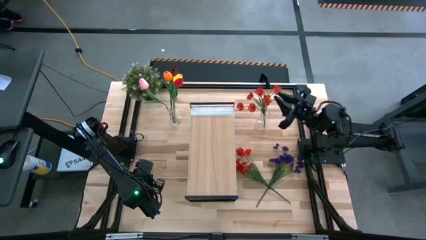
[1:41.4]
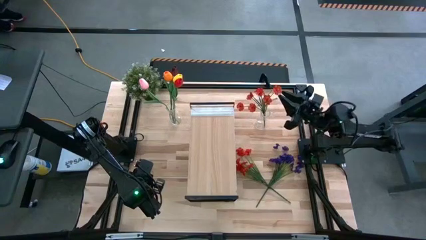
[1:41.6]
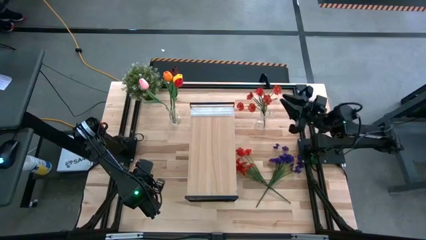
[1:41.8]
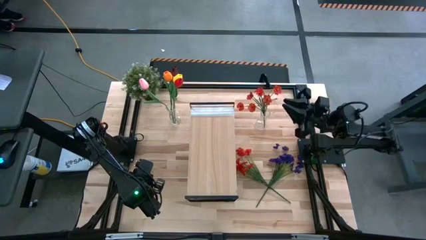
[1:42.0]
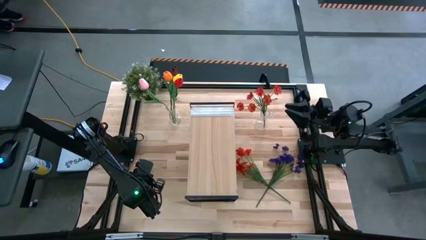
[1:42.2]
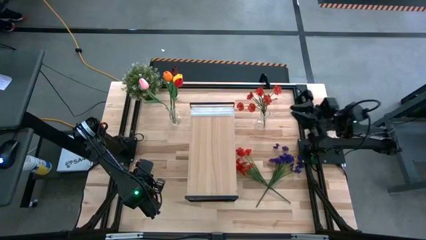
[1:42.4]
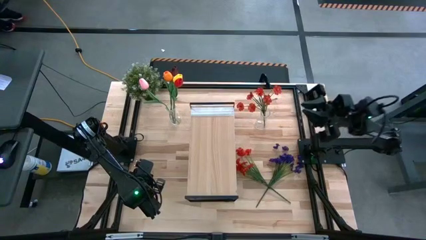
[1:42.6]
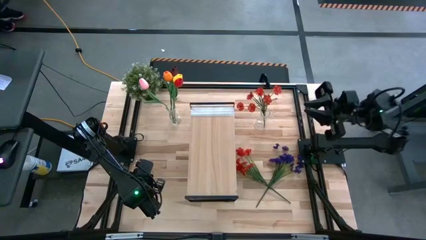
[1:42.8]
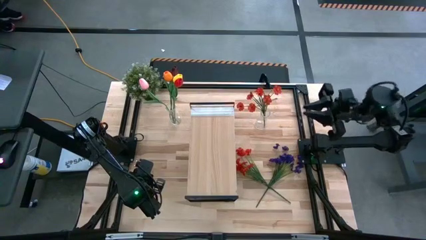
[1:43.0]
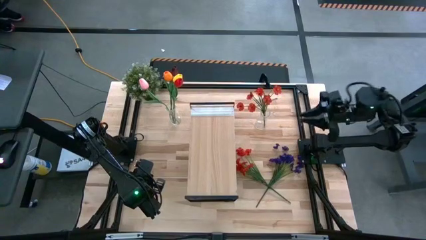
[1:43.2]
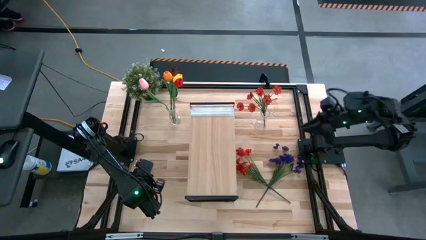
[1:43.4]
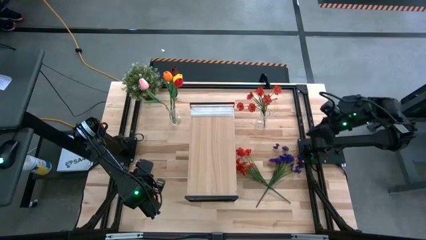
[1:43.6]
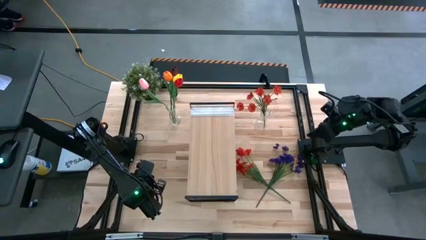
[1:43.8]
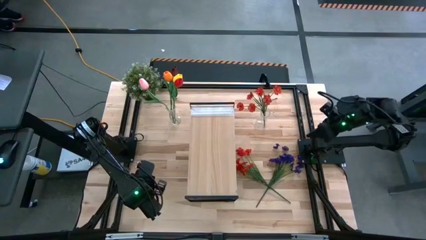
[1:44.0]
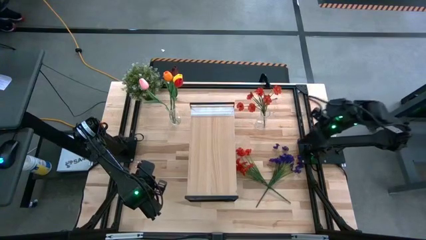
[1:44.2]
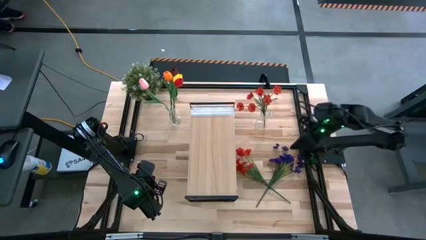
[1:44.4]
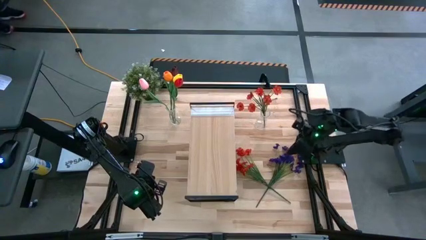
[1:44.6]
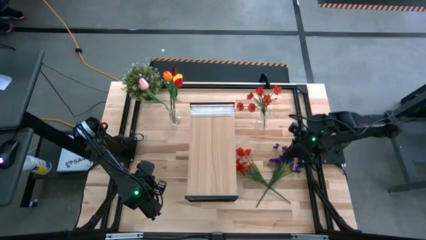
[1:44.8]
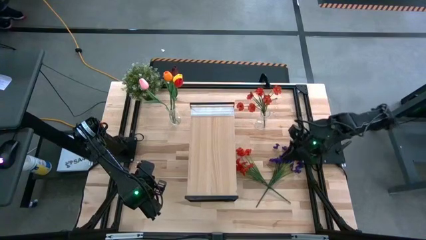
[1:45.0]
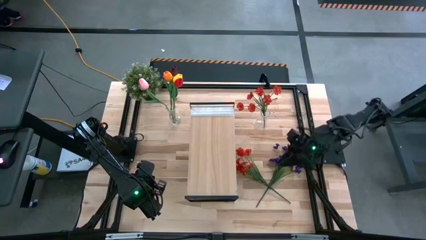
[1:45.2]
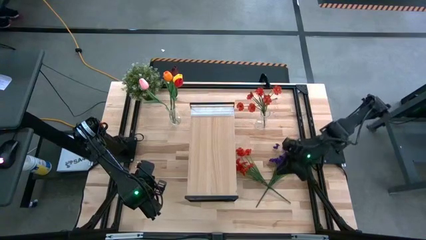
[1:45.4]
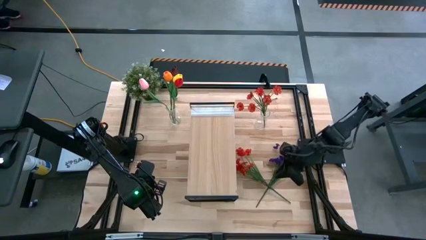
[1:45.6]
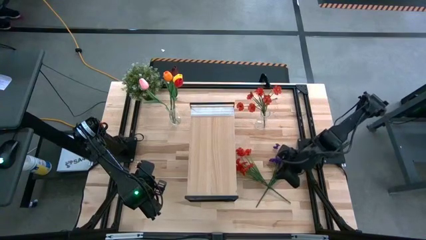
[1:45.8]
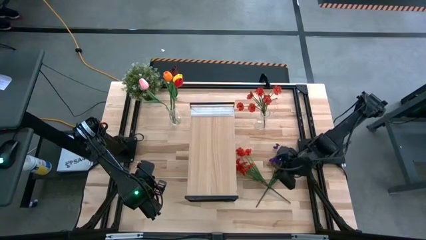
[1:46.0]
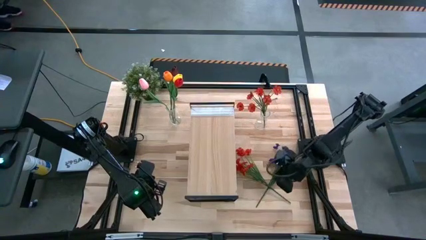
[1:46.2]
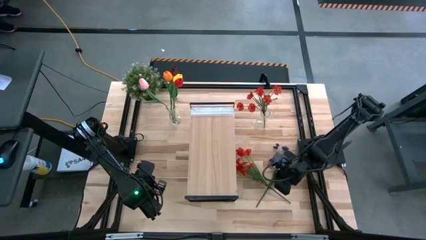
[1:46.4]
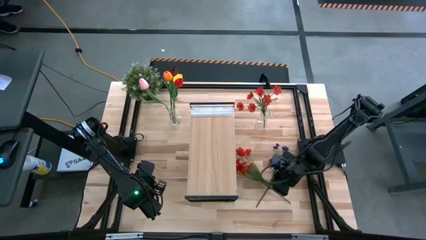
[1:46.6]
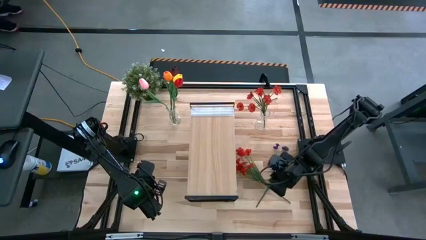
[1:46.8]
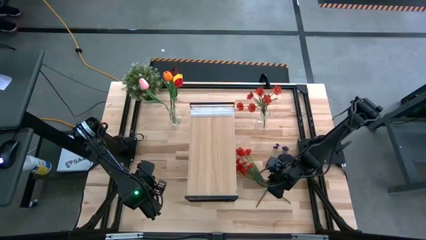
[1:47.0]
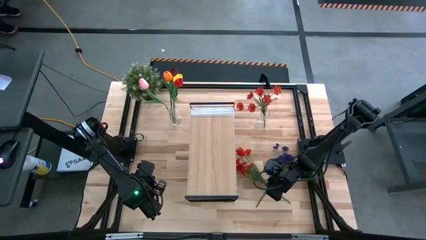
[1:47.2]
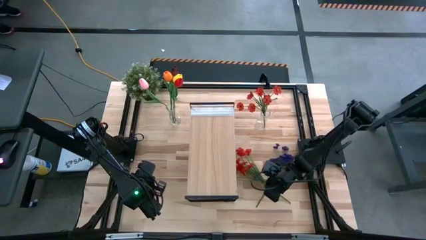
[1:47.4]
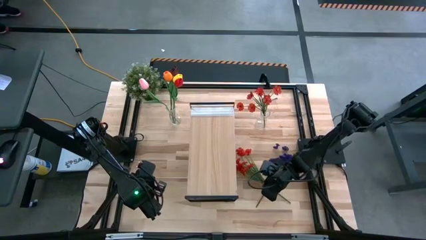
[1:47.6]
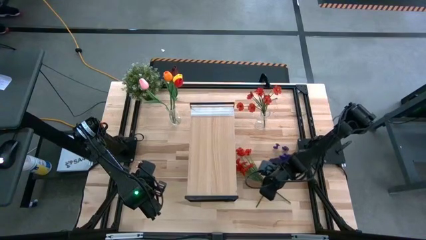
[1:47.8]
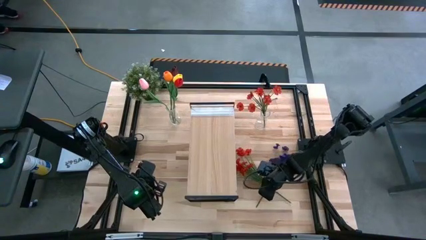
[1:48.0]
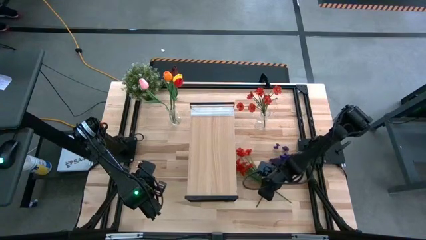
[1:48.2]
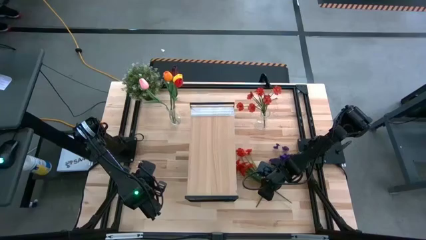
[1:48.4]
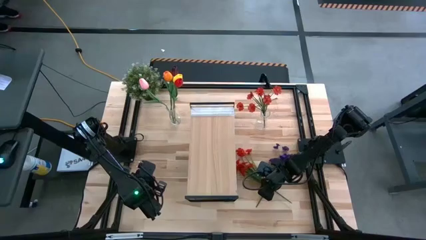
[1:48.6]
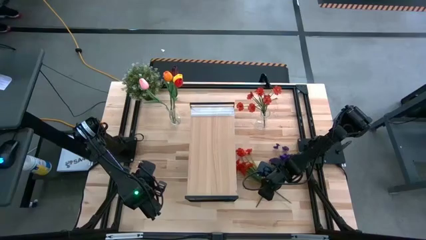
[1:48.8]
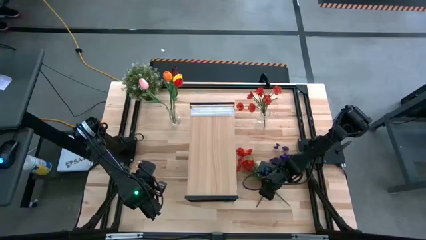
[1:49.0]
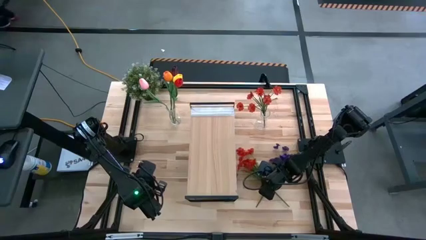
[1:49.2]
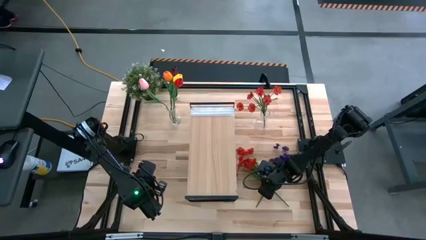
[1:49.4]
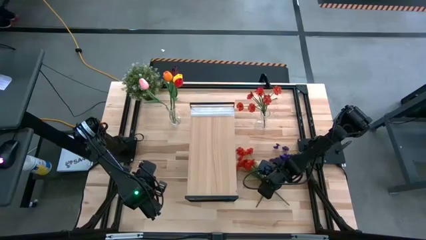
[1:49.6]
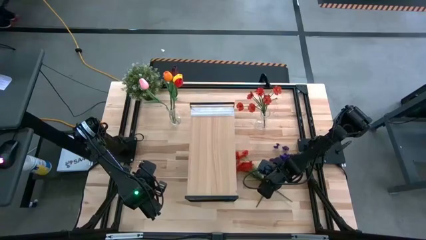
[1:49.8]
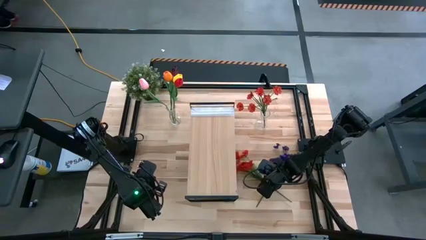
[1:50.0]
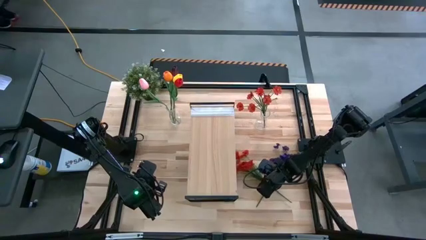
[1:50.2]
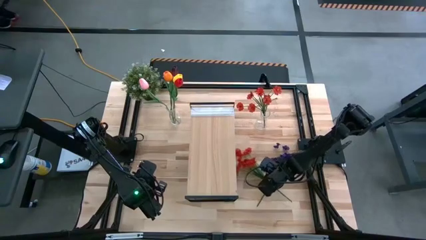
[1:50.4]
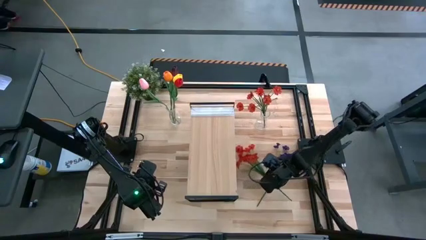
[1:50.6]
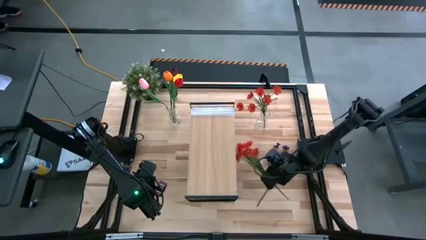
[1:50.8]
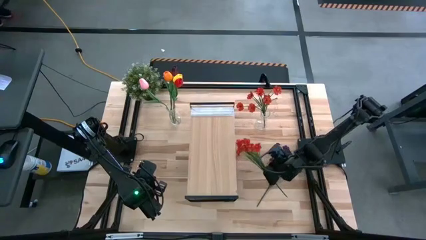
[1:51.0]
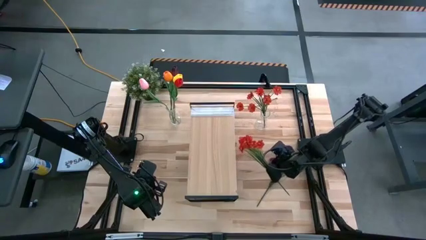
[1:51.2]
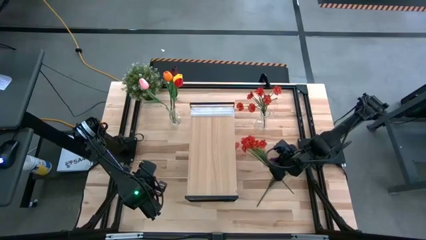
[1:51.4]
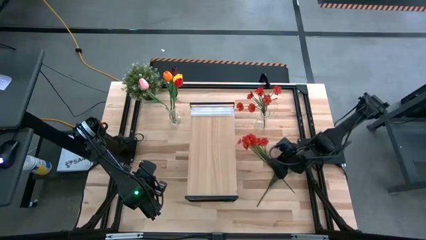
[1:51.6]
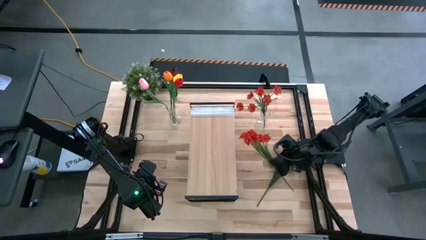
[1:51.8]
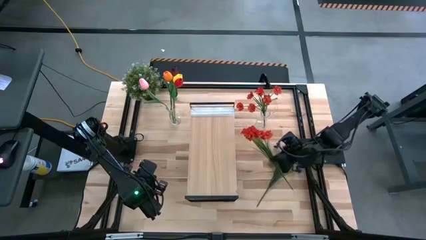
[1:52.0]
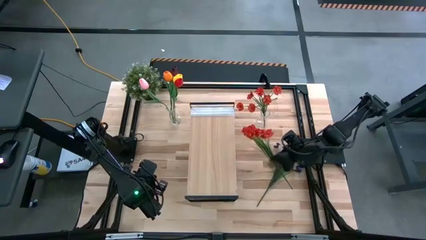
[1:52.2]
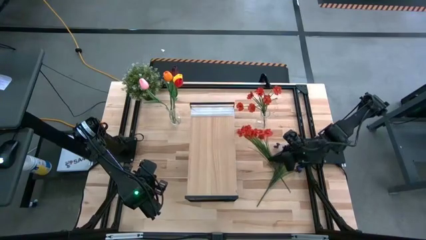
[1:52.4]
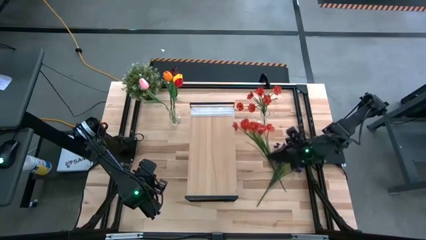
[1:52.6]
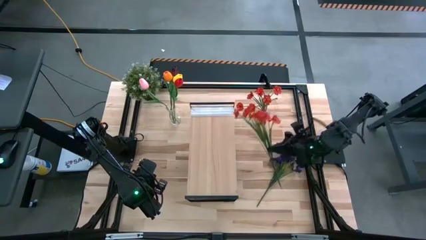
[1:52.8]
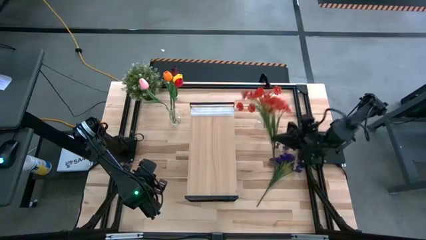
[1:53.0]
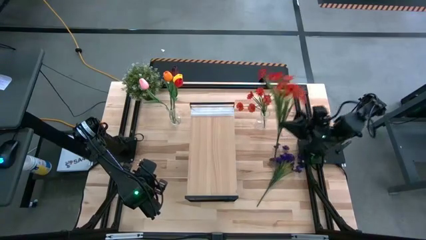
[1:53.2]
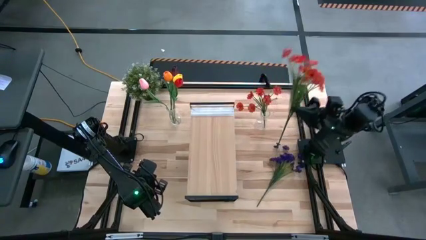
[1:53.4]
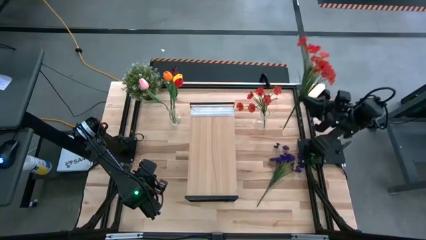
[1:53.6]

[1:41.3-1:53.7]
Task: Pick and place flowers into a vace then onto a shelf
Put the orange flowers into the right transparent vase

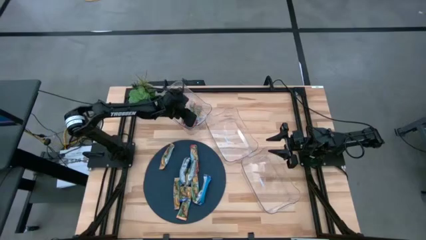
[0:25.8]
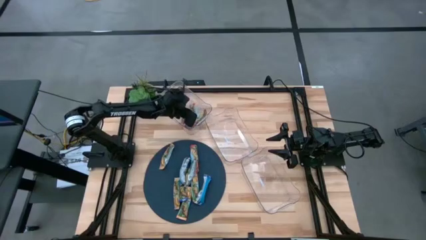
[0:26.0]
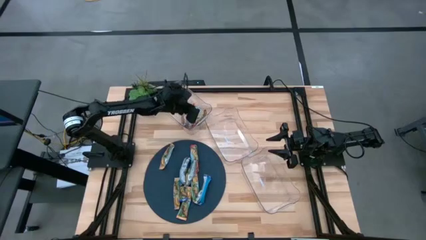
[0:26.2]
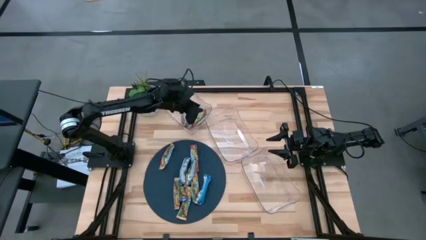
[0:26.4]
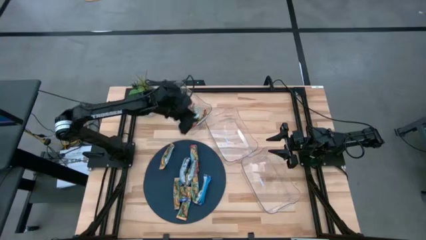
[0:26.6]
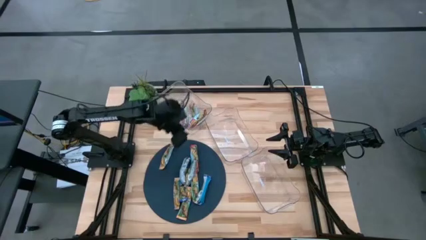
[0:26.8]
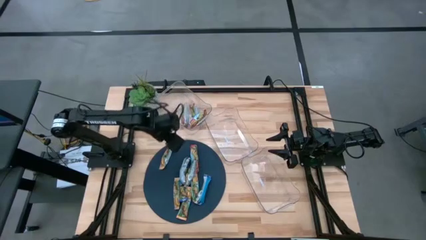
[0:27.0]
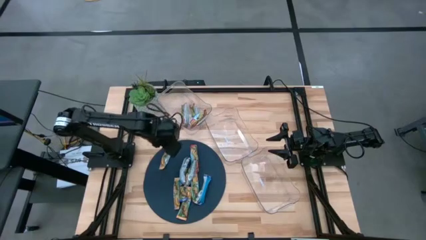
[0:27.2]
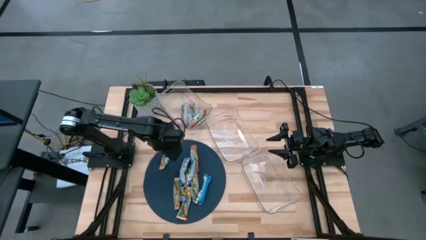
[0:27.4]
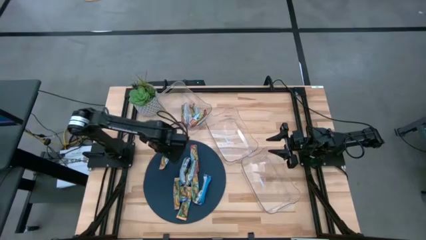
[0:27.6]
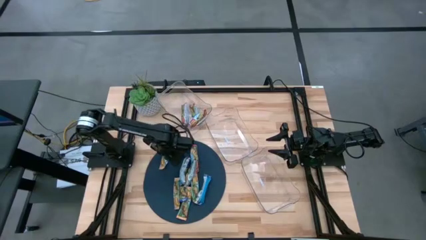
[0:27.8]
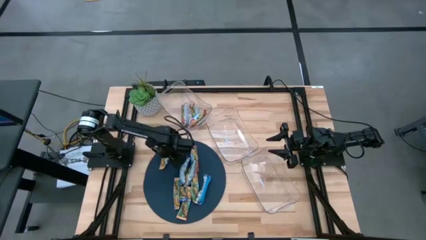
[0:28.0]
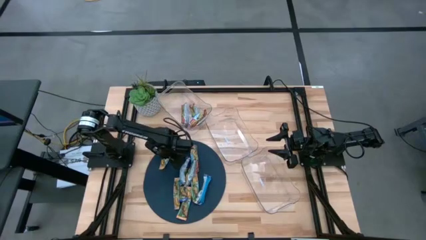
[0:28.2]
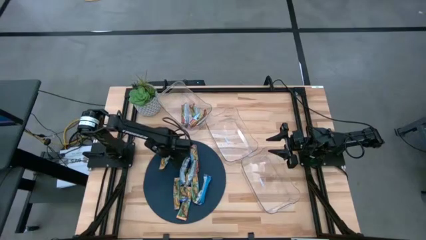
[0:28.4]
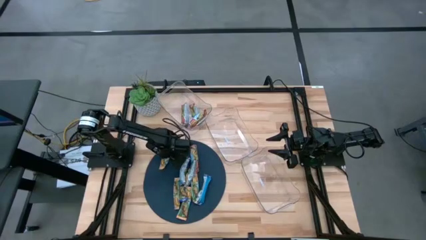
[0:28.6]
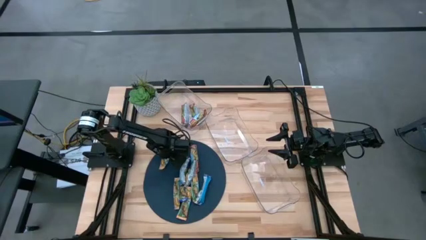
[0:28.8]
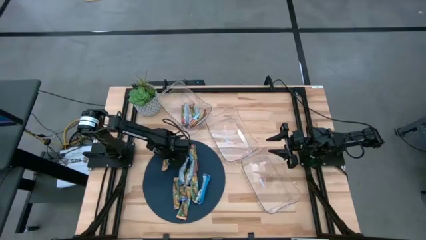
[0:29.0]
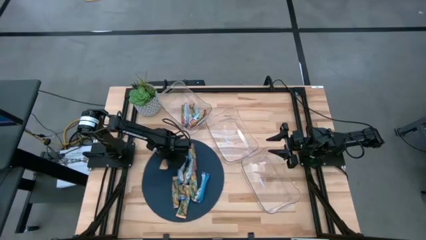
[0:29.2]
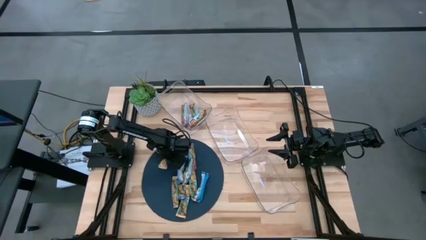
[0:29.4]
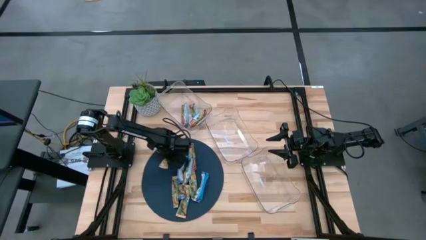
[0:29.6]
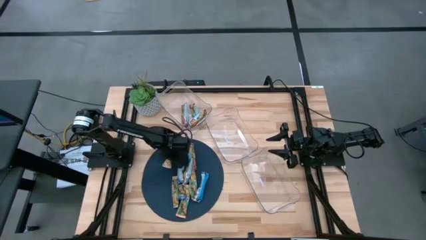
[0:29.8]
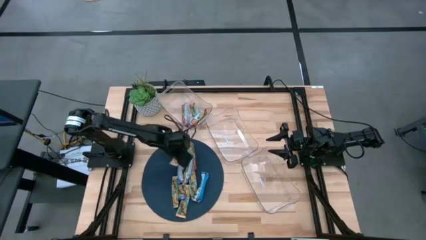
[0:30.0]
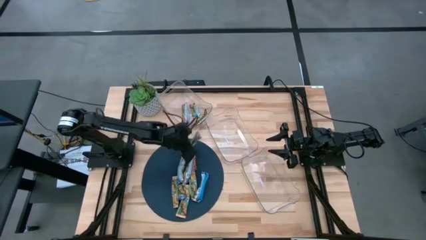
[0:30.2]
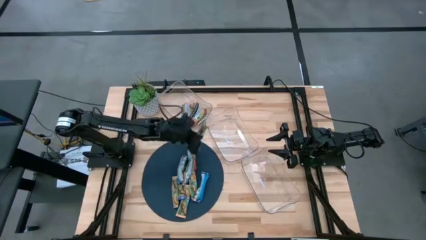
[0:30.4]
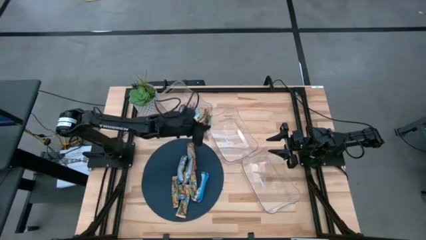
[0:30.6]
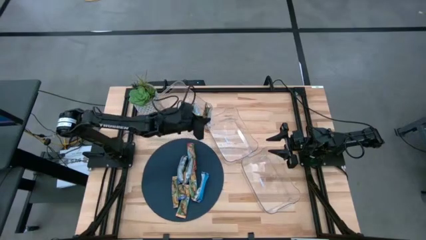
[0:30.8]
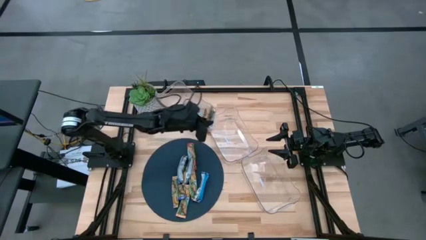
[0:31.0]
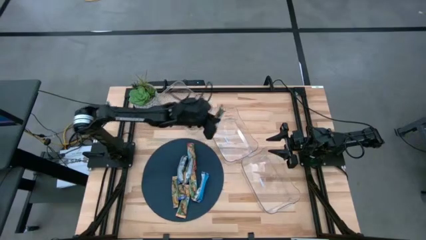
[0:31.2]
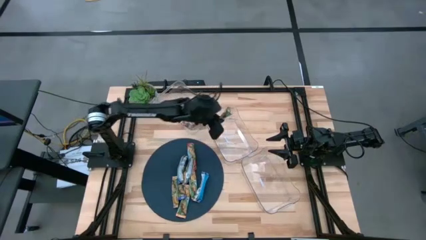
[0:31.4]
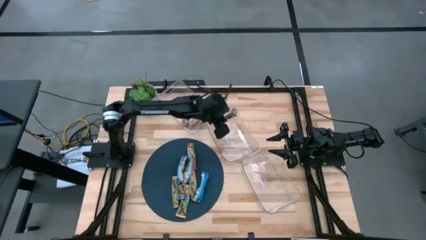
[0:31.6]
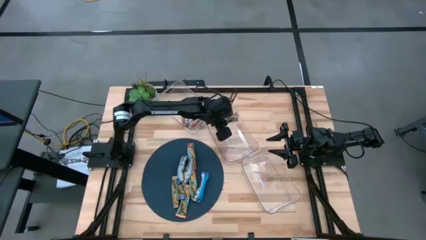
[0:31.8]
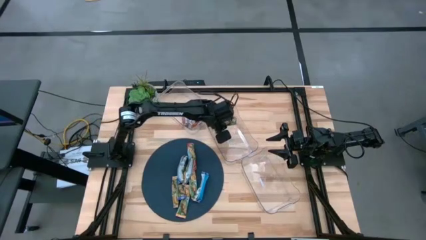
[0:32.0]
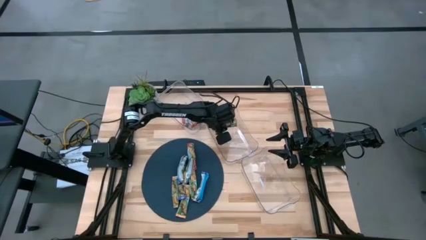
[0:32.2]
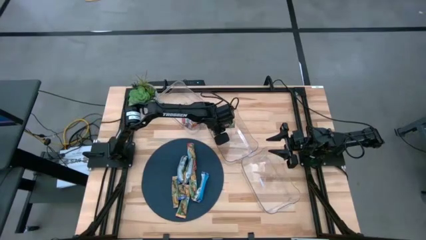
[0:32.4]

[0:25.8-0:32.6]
Task: Pick and place Granola Bars by type
Put the yellow granola bar into the middle transparent bin
